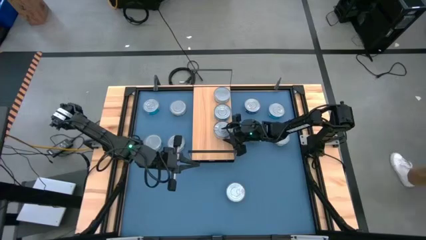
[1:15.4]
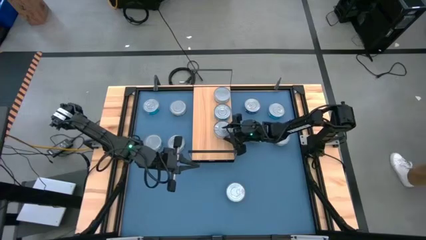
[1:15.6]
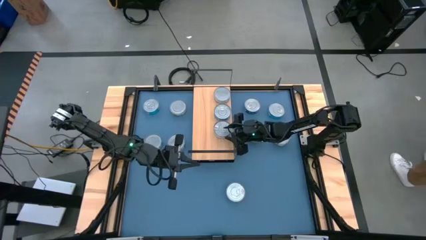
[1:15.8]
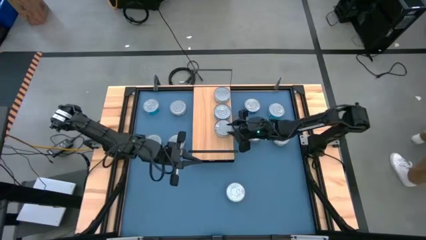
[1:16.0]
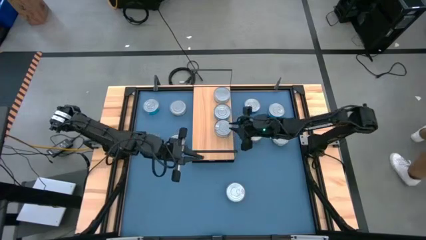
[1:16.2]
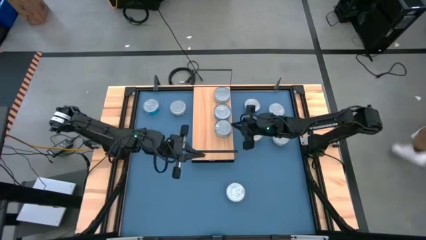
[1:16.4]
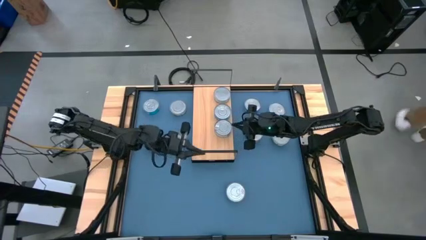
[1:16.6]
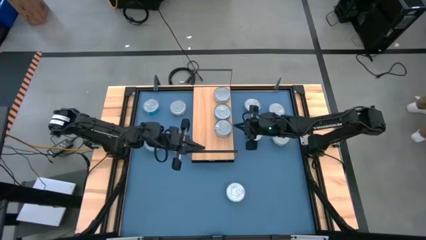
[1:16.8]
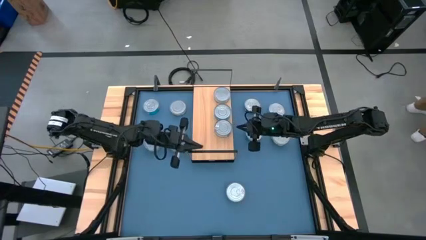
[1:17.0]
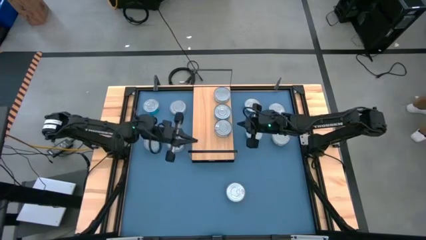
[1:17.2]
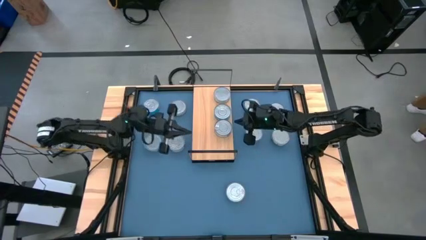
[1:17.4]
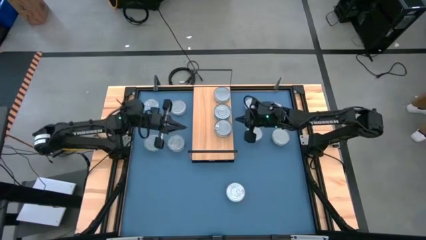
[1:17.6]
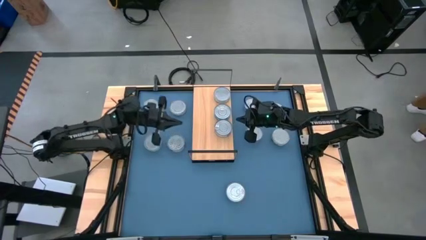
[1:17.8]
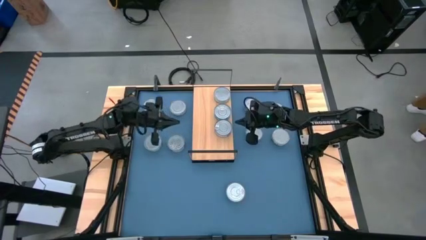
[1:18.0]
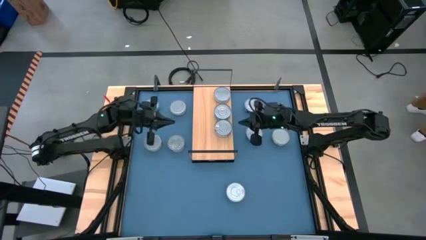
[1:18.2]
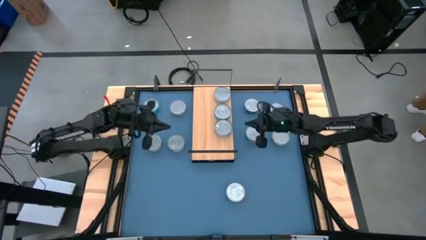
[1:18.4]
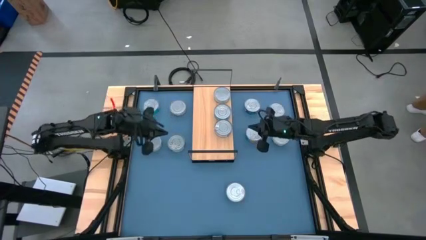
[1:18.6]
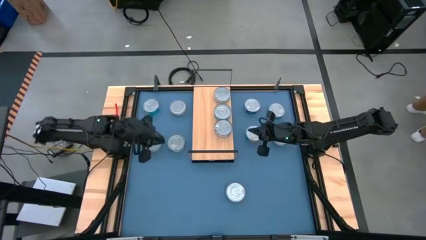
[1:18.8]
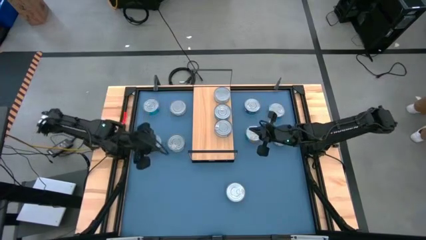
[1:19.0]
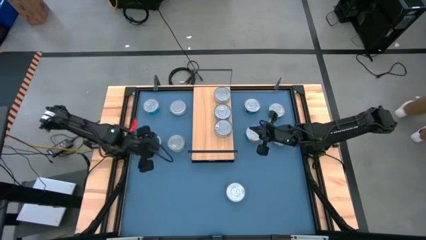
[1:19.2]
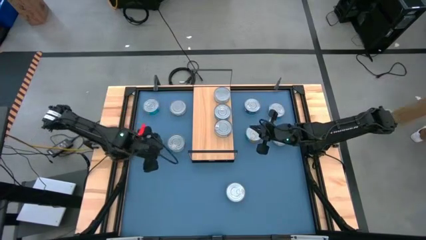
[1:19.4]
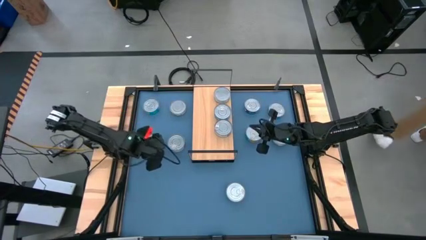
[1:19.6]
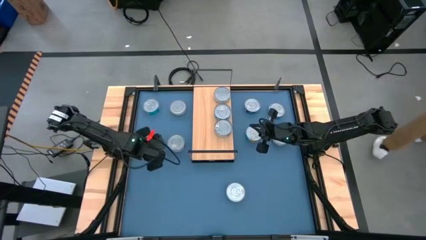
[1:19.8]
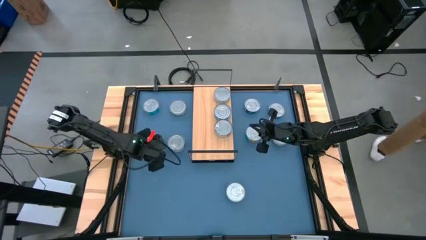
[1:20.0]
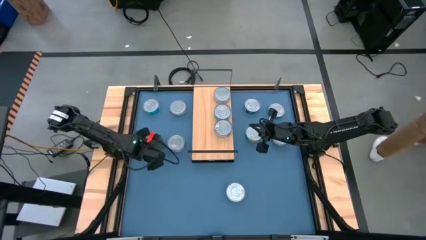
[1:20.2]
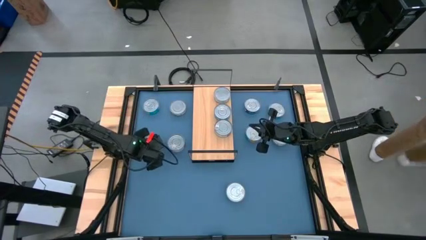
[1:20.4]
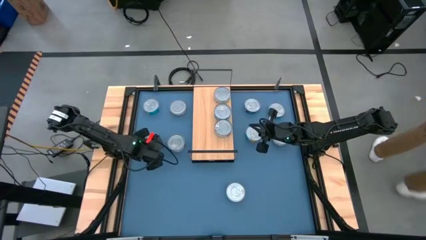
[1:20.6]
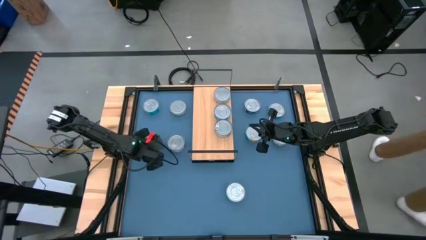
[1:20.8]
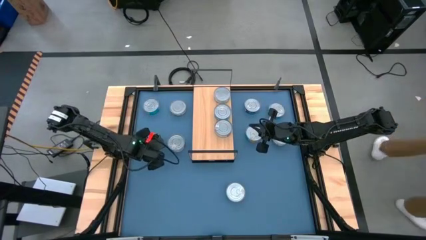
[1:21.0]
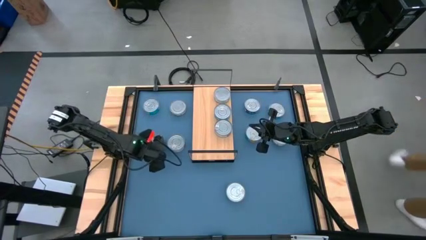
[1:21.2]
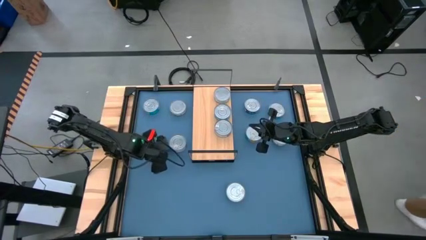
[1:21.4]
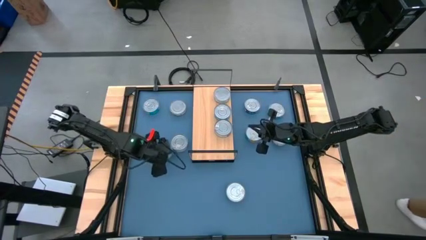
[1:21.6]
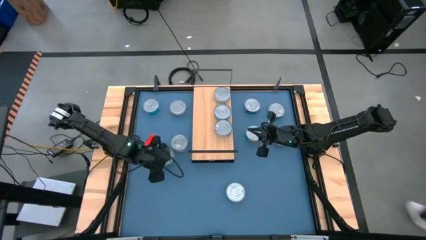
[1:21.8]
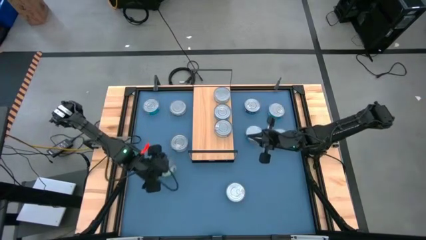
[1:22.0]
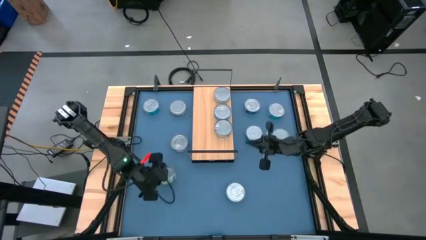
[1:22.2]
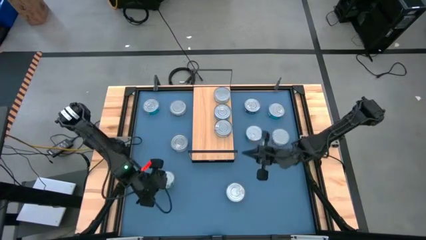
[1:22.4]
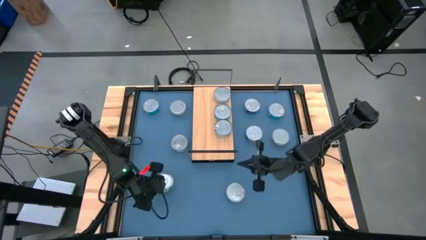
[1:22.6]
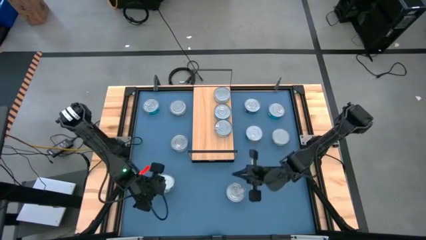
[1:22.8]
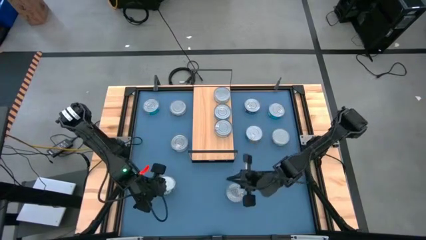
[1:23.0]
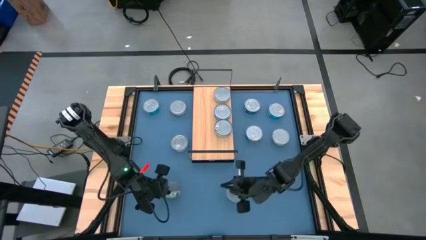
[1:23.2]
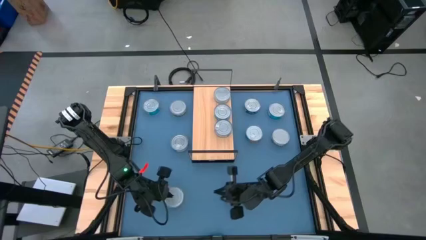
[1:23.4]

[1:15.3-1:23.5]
Task: Stack canned seafood by type on shelf
Stack the green tuna can on top of the other green tuna can on the shelf

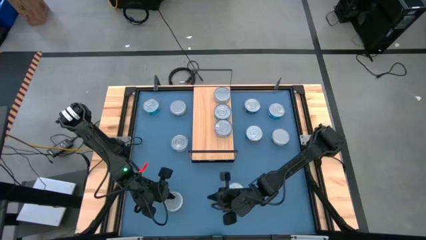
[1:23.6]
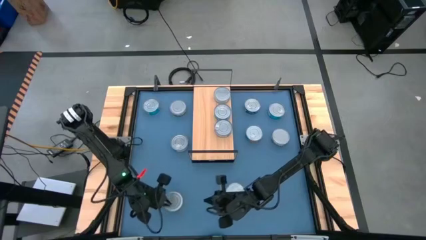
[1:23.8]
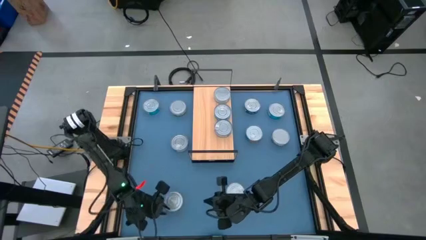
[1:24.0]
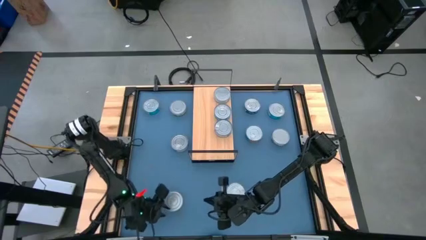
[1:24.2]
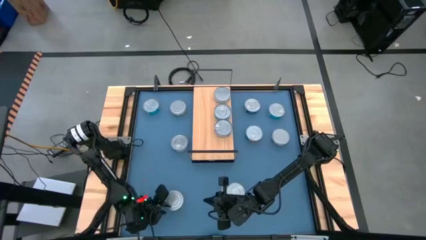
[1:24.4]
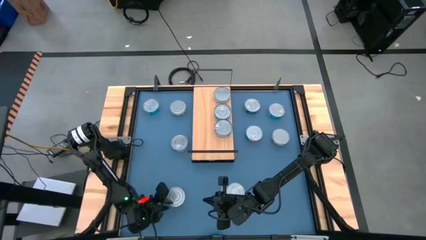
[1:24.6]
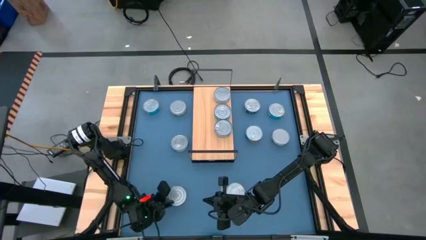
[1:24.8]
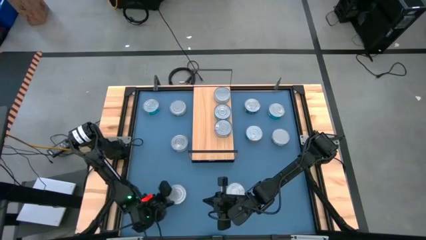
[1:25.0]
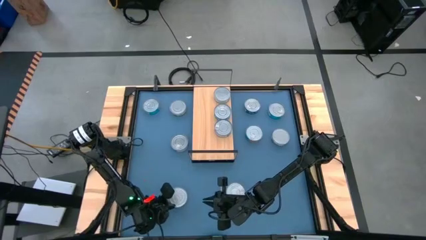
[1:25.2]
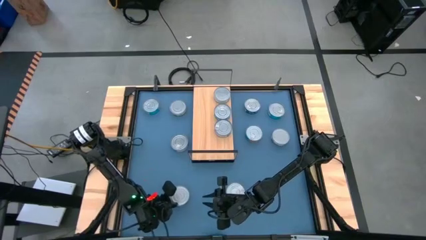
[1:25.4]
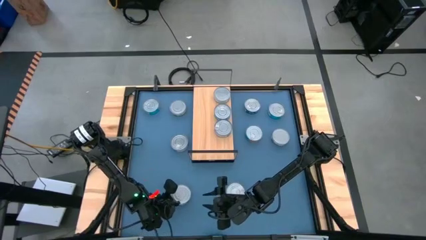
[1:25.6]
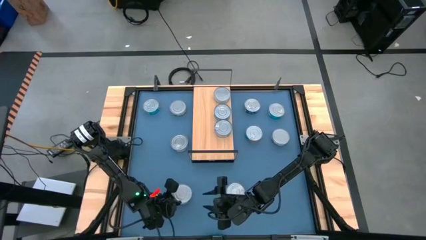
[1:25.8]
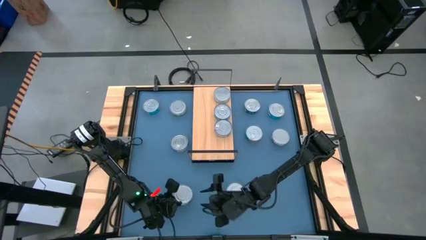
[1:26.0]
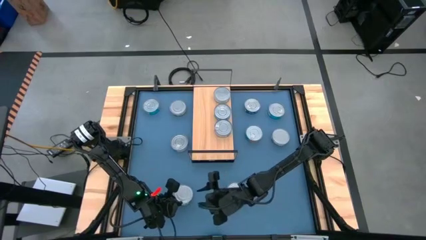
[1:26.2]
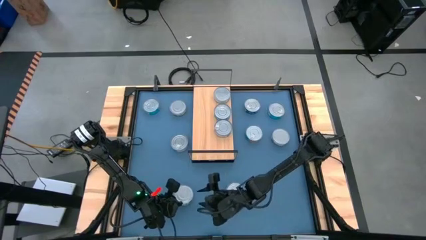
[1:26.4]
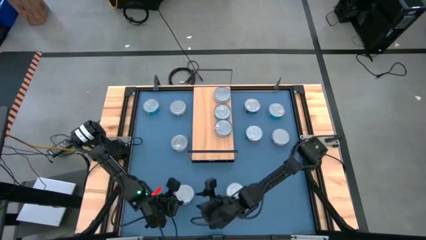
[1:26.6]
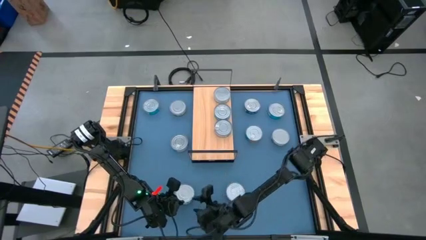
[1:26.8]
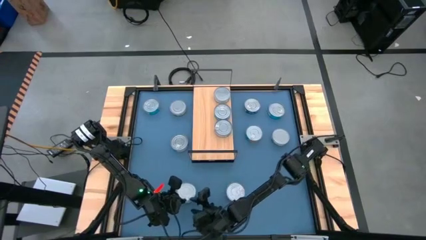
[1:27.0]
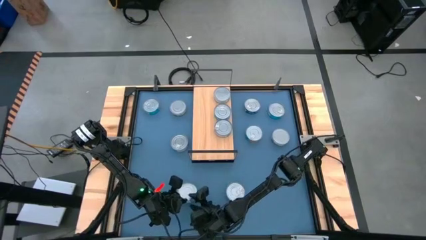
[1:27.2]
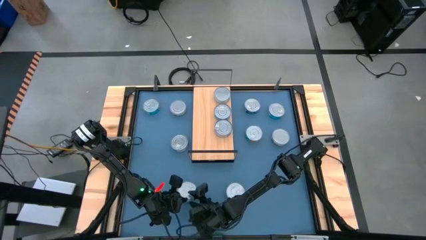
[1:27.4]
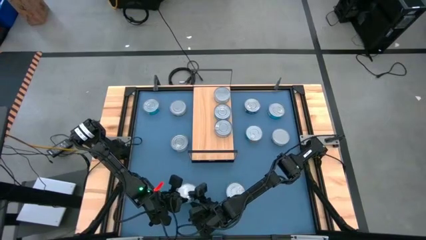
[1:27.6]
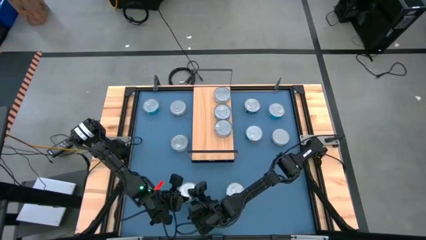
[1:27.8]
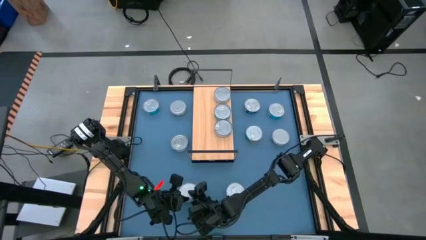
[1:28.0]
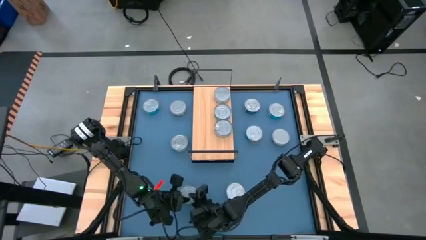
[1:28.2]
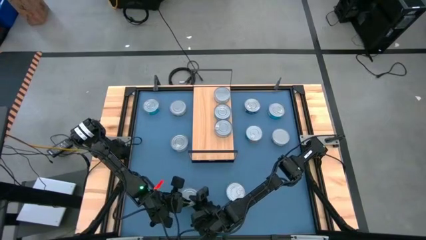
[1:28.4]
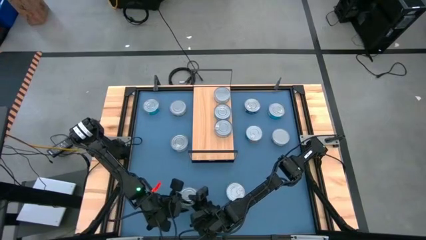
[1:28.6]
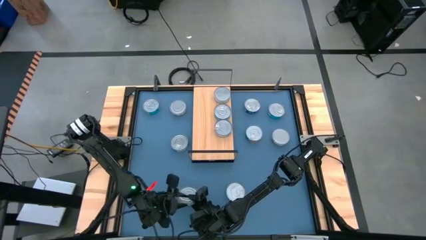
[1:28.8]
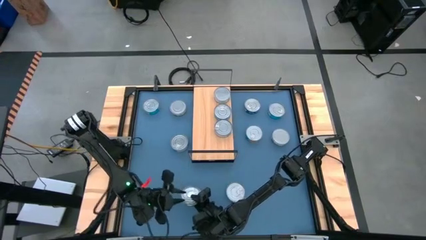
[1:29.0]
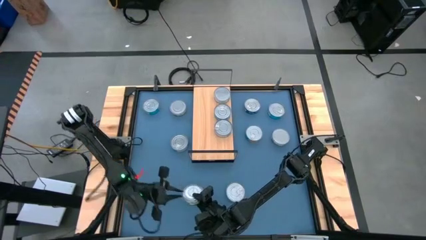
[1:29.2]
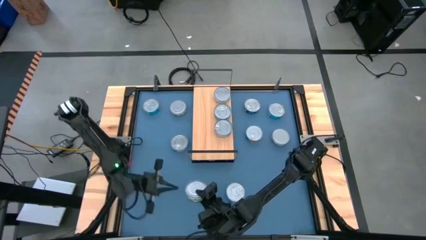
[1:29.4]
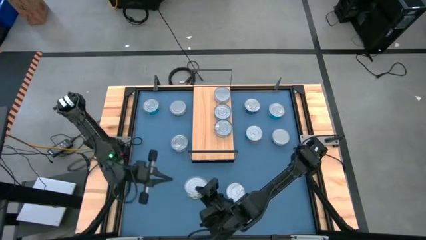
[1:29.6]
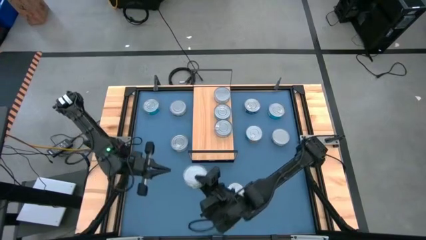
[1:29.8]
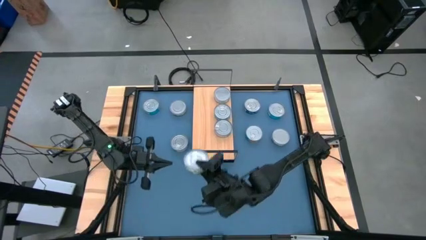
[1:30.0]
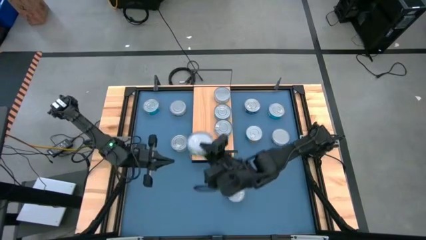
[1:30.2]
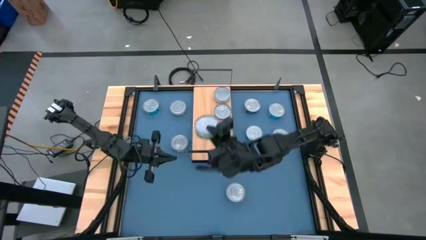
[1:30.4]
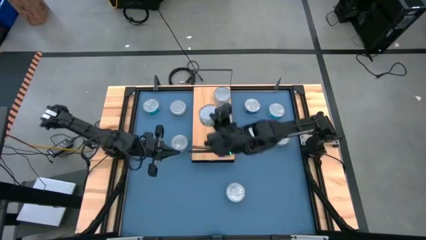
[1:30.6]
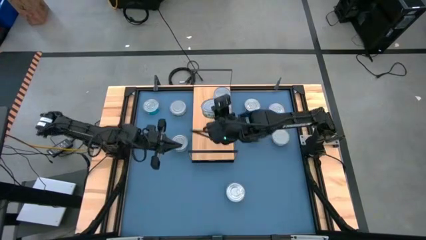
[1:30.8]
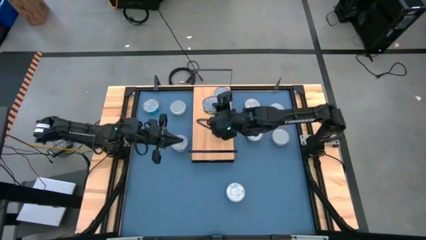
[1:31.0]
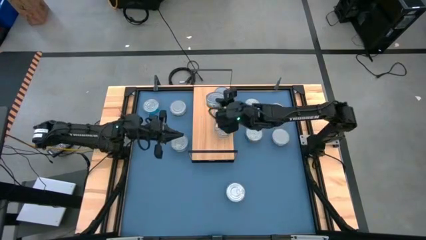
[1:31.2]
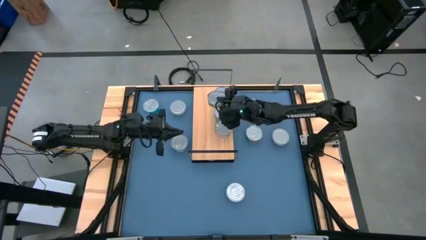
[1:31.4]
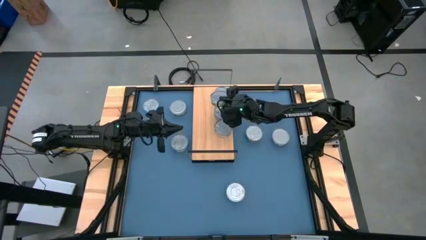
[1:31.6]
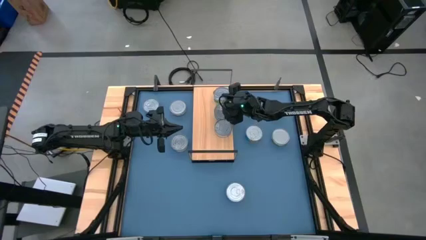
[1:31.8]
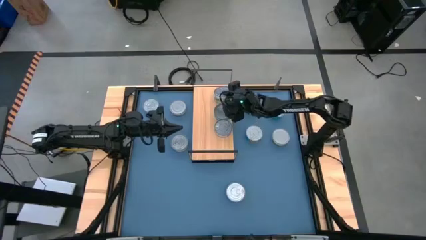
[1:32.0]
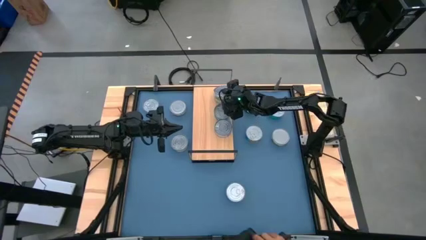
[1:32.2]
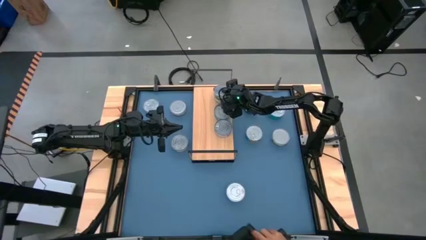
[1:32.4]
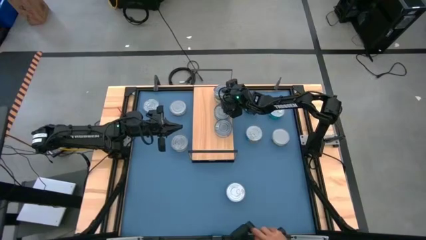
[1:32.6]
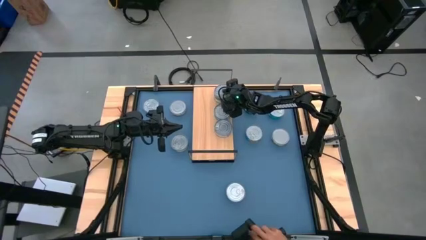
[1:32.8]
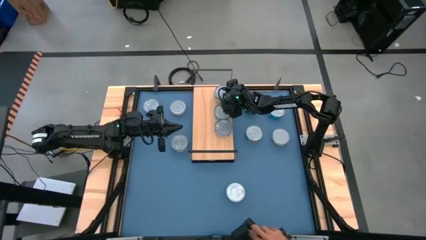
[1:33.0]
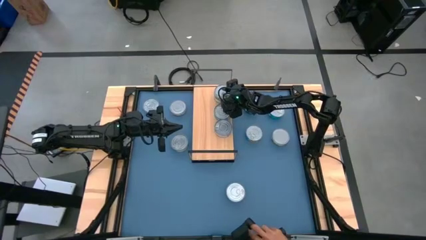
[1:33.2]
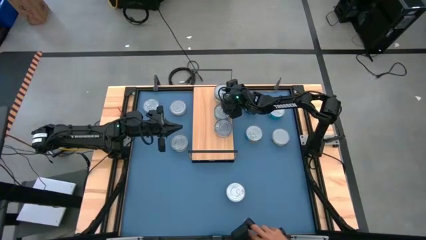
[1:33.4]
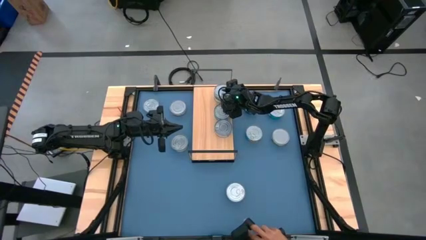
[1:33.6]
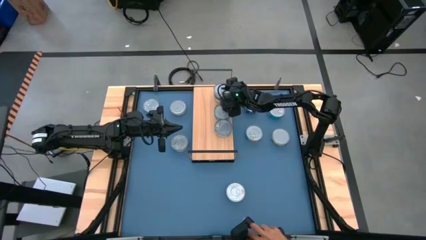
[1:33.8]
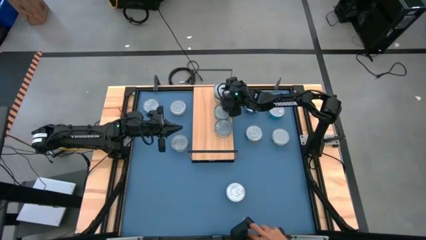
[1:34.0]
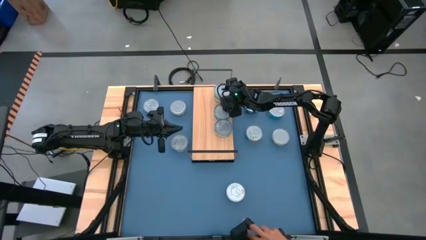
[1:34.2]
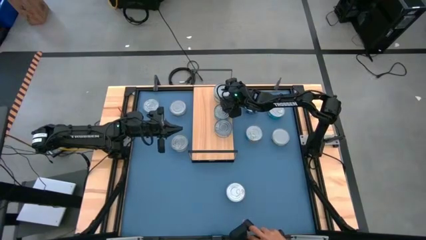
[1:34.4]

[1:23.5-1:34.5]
Stack the green tuna can on top of the other green tuna can on the shelf
